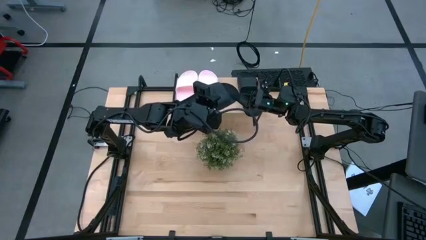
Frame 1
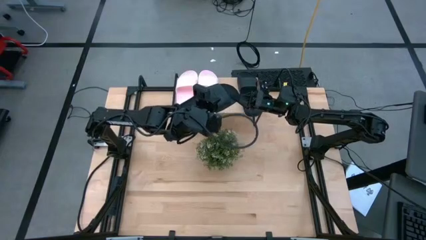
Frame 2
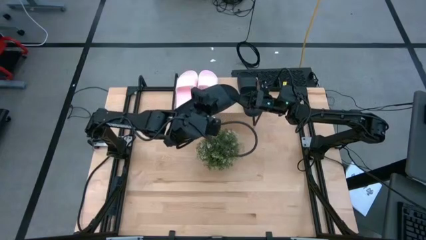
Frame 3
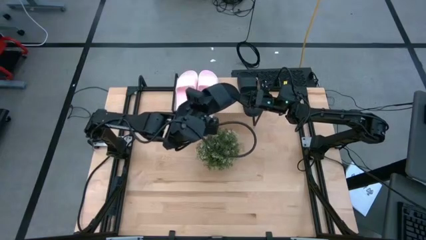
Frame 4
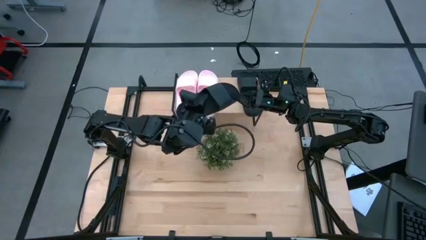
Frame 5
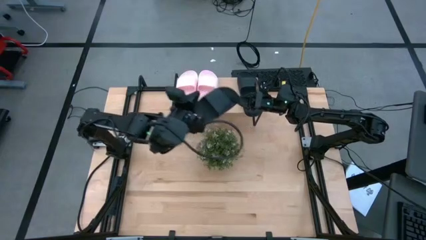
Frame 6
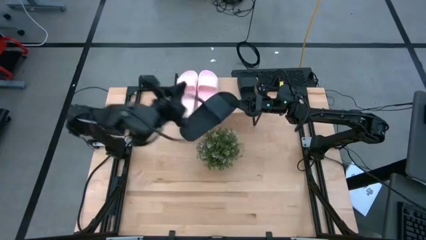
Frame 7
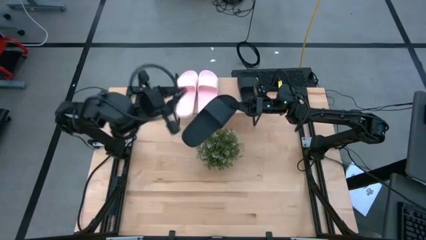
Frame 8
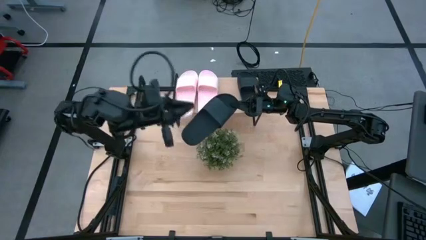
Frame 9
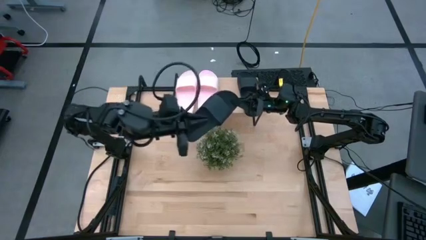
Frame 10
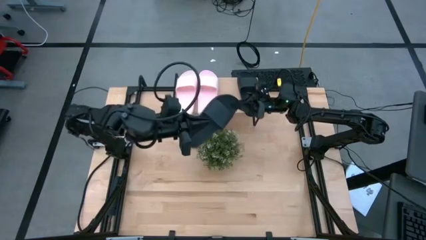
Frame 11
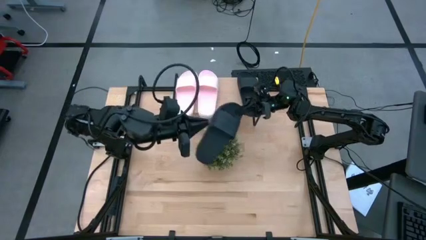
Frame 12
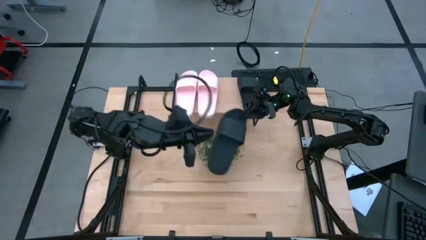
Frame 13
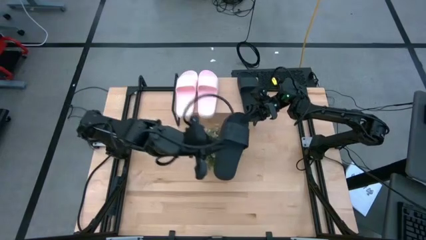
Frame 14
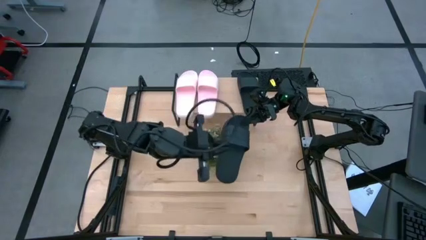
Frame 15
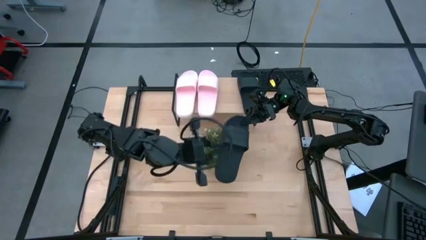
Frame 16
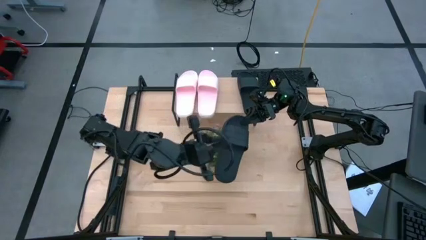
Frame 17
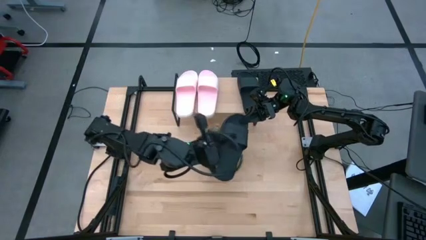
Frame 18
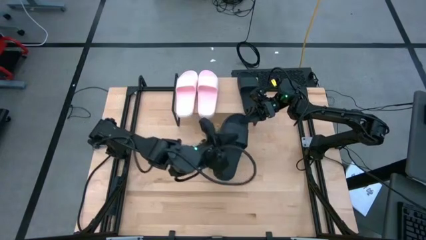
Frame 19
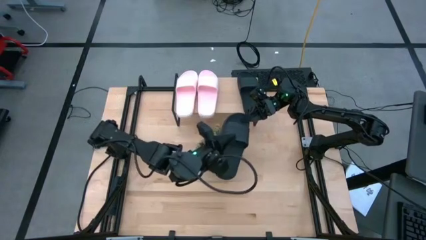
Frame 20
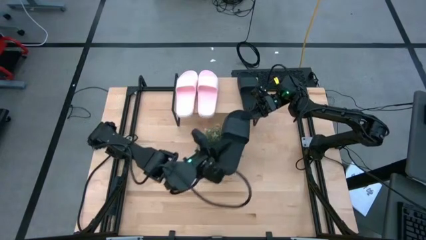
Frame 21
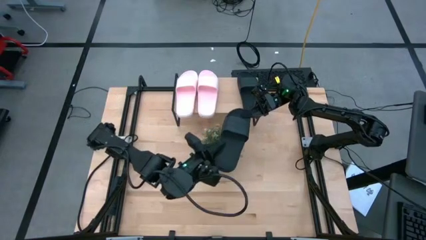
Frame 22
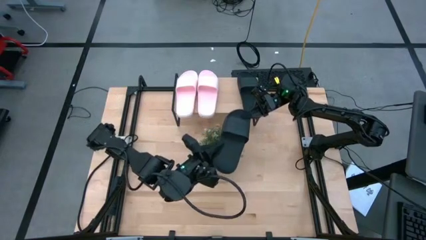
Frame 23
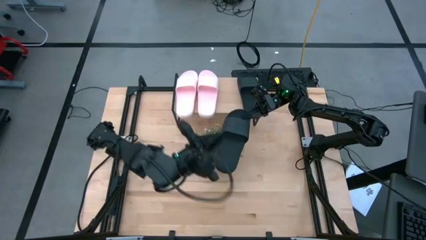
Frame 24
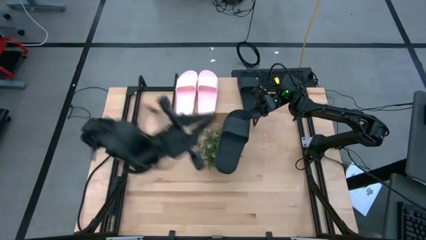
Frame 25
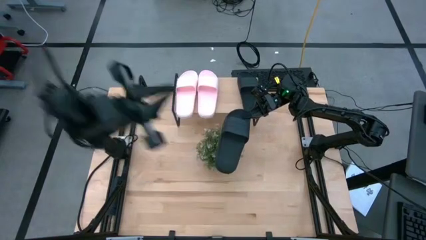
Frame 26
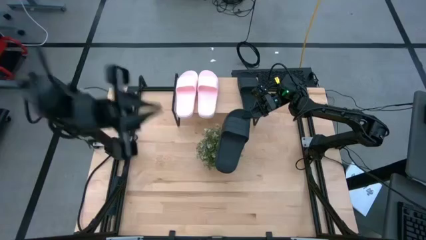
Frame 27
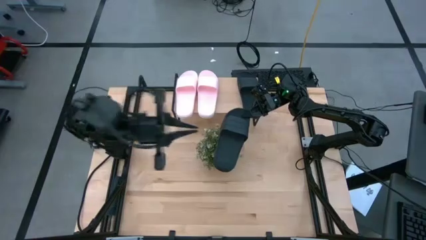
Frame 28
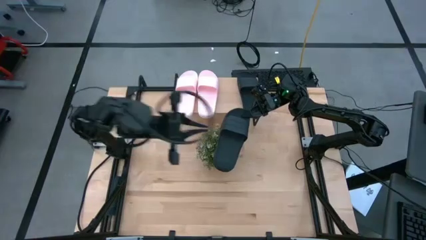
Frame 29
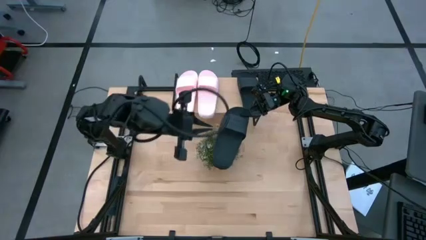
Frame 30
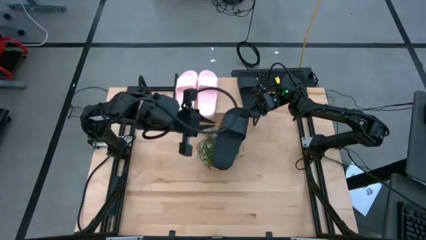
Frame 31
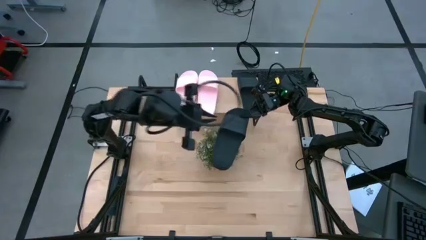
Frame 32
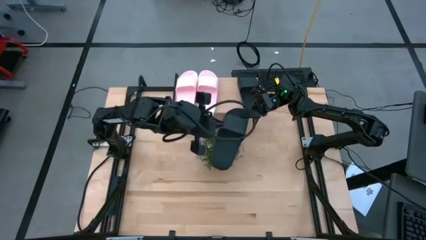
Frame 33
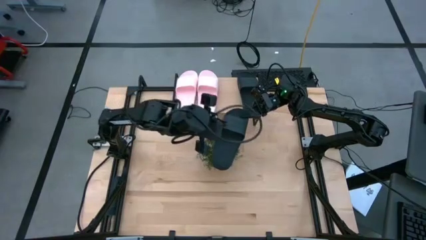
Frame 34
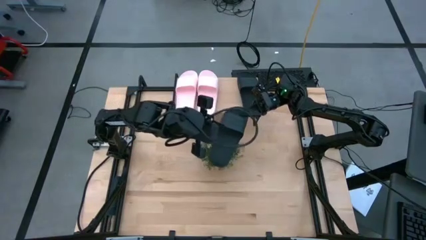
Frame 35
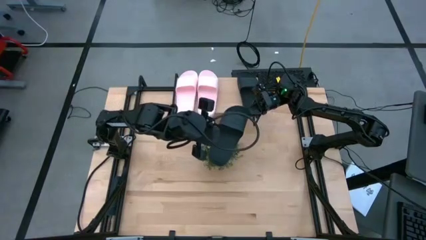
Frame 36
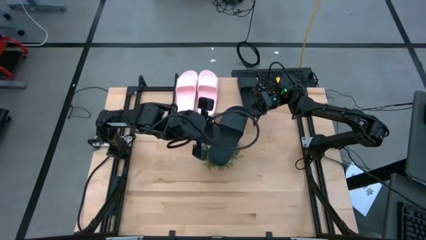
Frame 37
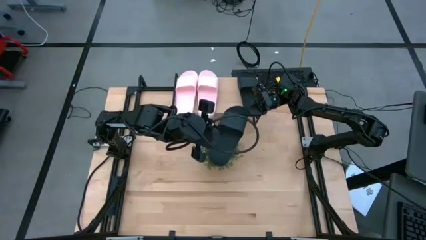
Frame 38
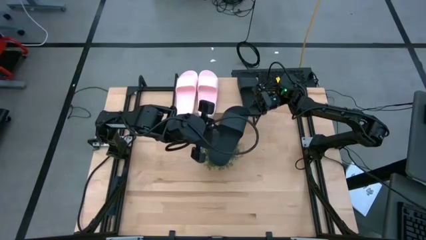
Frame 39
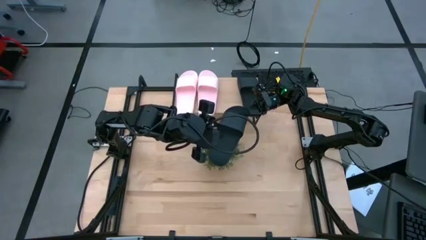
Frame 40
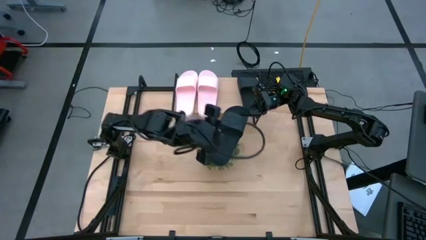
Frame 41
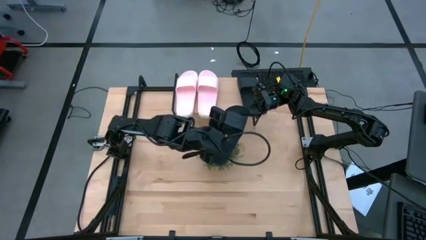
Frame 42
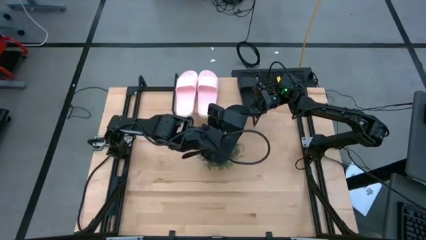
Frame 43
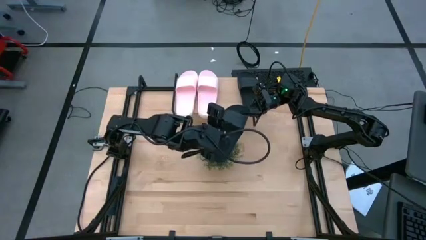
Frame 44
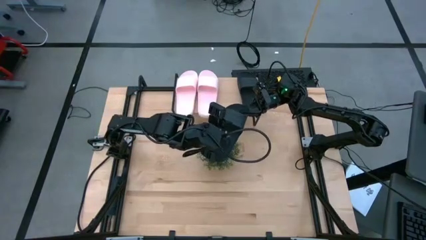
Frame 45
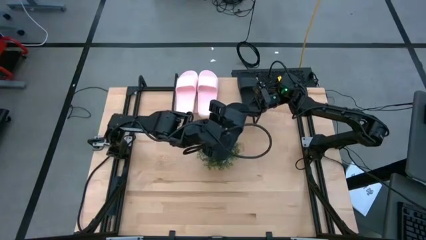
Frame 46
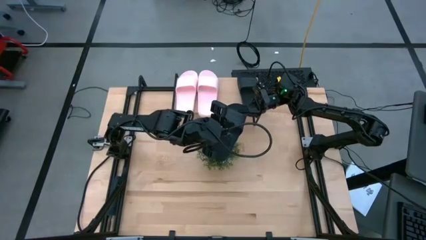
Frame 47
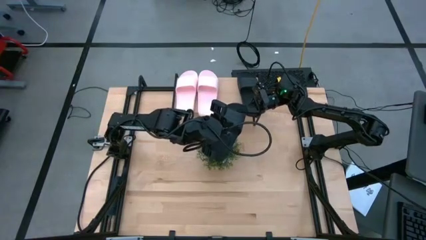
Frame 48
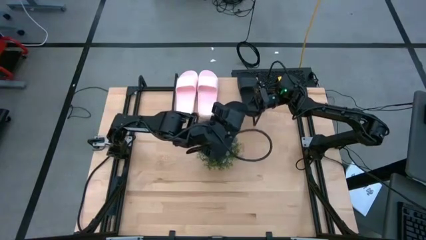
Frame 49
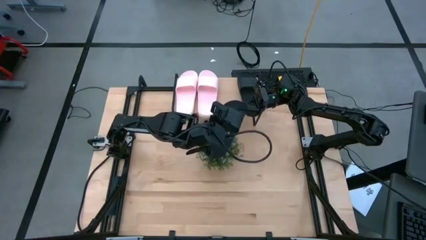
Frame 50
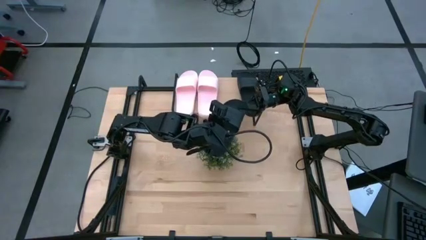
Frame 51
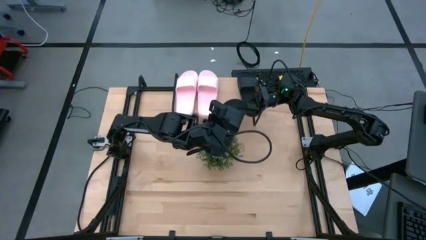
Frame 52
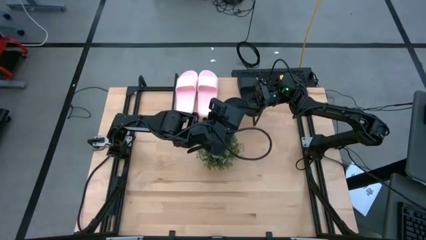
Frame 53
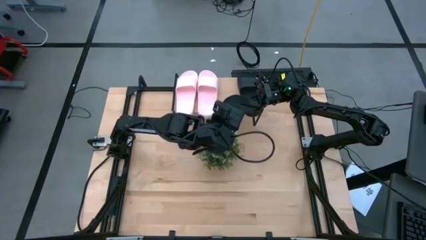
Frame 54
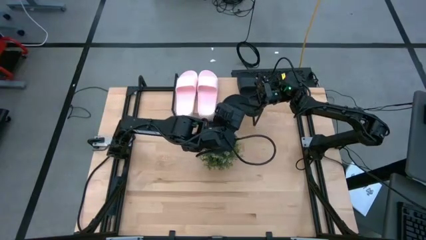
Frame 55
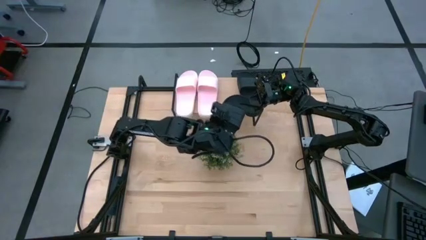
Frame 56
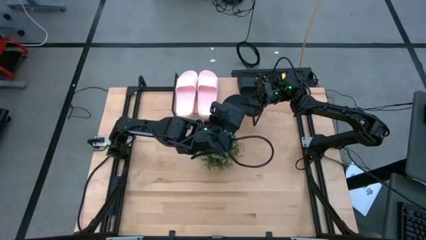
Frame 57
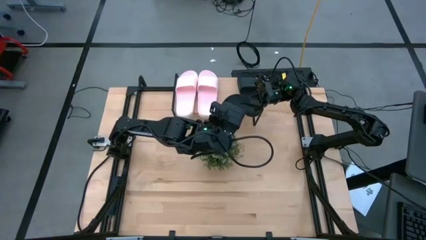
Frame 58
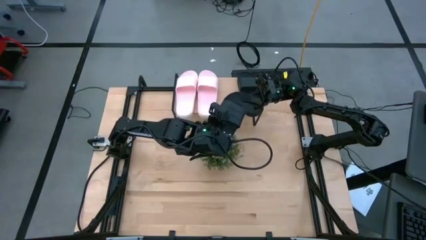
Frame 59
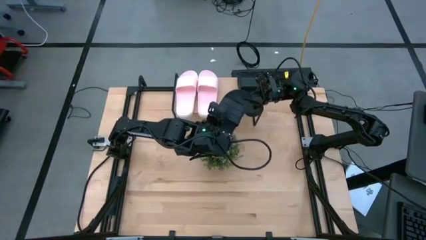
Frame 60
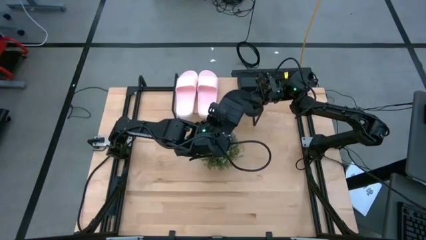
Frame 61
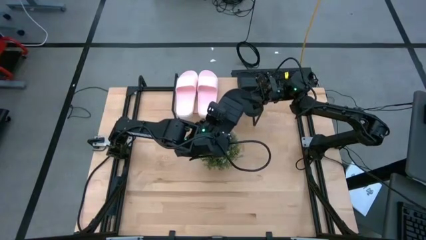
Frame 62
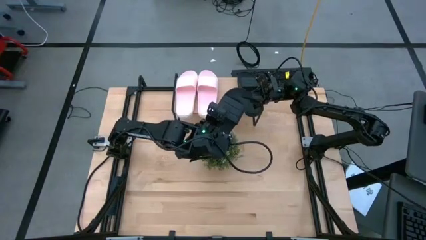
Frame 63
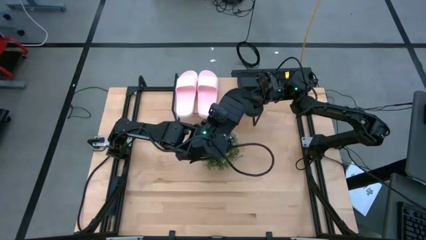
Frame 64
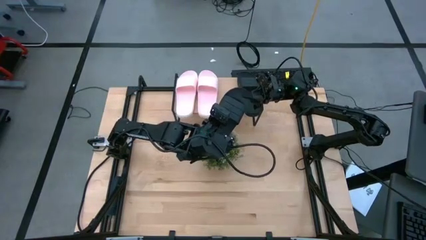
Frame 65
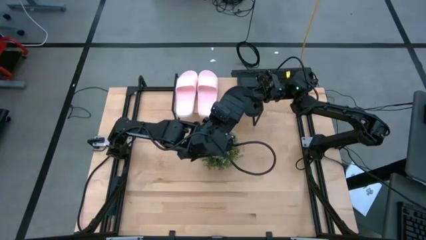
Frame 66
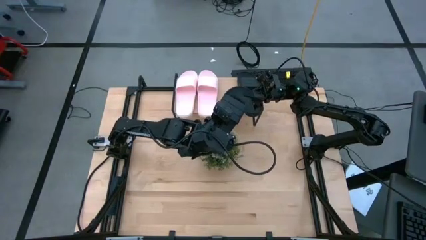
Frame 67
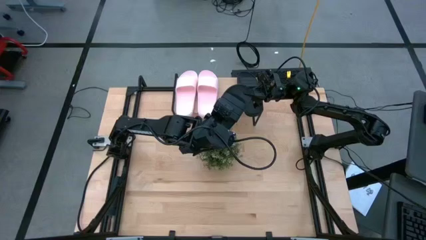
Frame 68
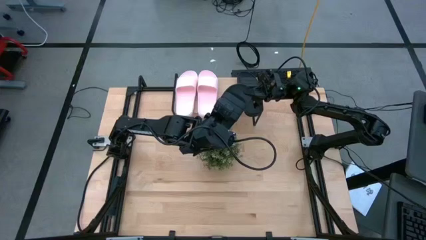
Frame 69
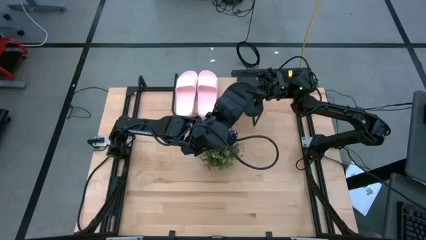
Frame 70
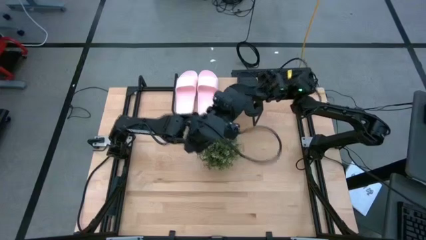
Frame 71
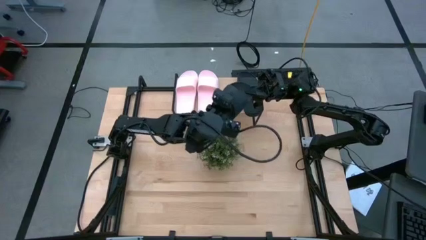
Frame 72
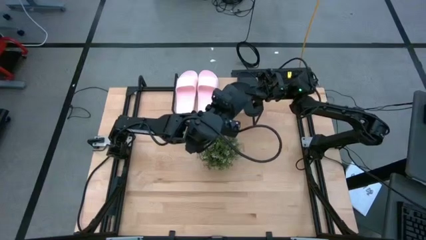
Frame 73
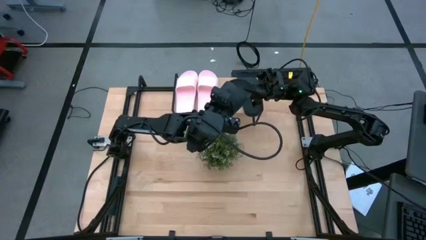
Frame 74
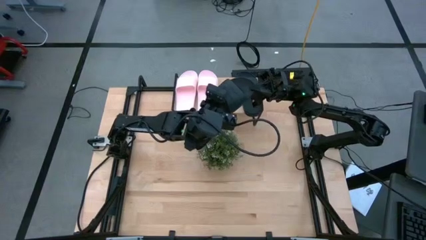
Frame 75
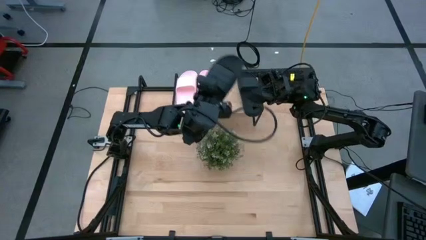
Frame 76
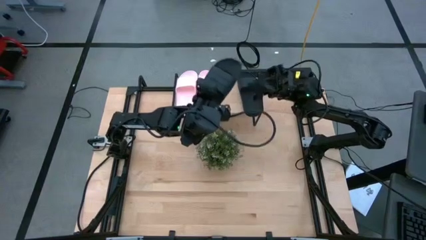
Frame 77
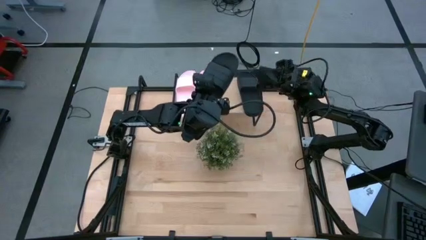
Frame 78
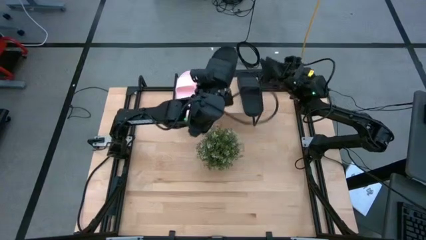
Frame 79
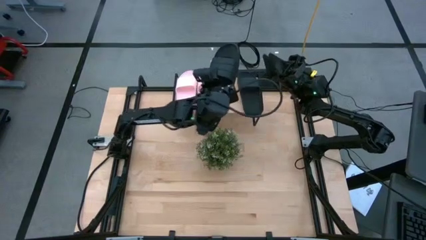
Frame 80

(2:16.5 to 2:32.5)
Task: Pick and place slides into the shelf
Put the black slipper on the shelf
